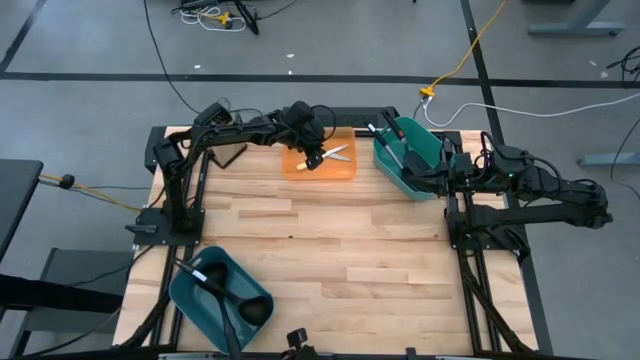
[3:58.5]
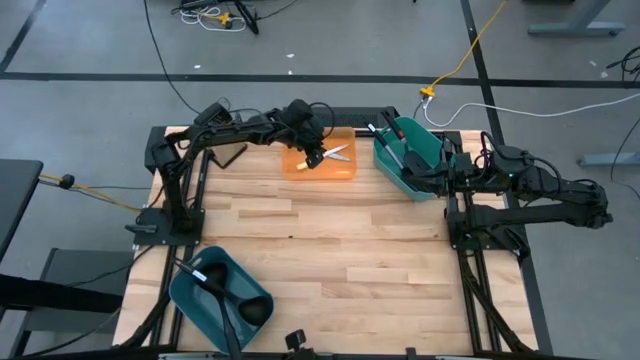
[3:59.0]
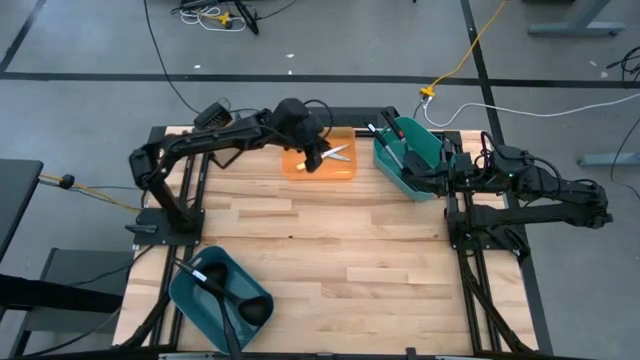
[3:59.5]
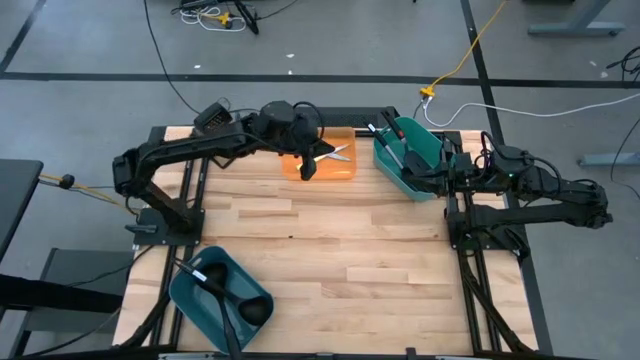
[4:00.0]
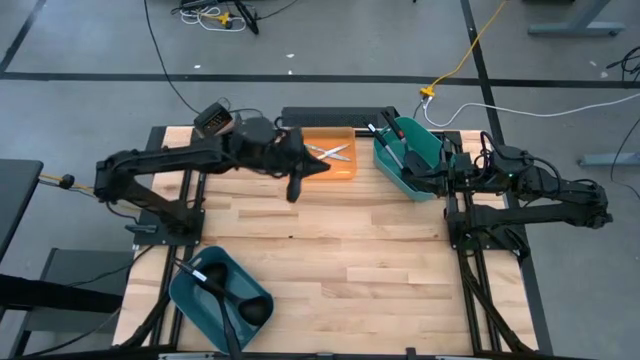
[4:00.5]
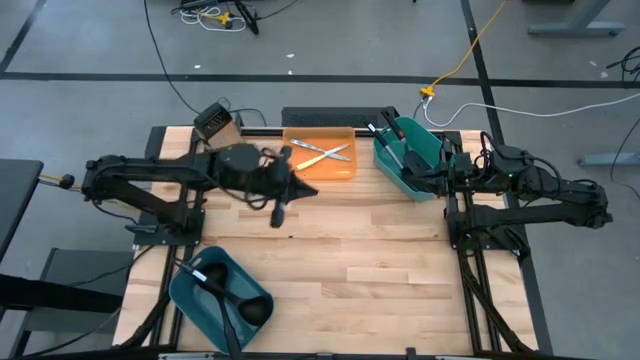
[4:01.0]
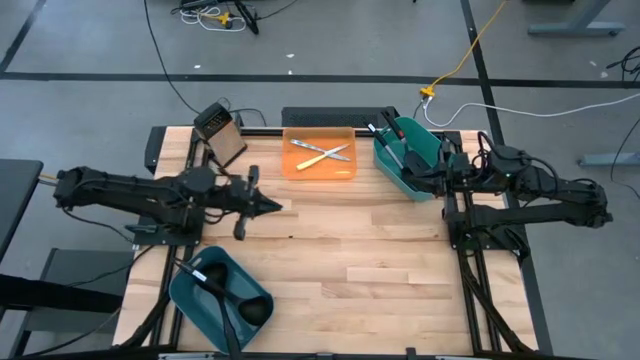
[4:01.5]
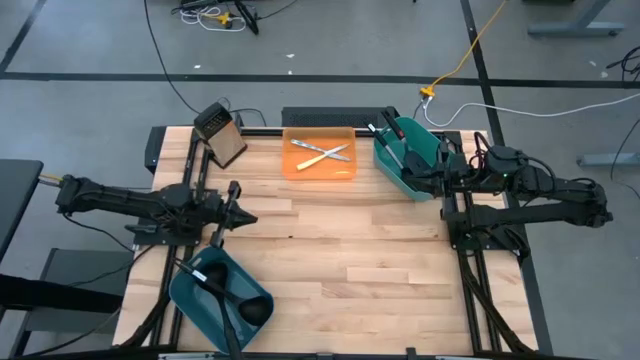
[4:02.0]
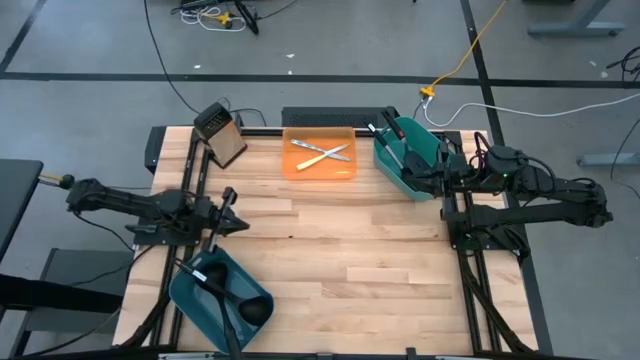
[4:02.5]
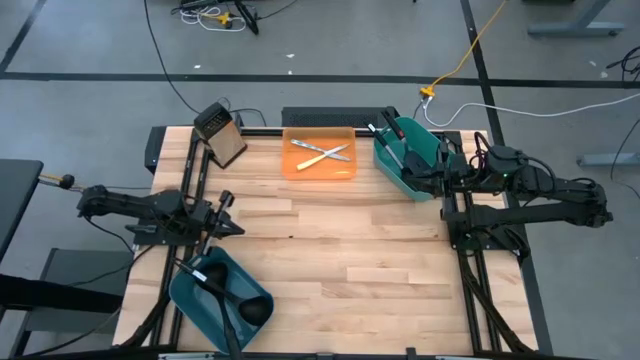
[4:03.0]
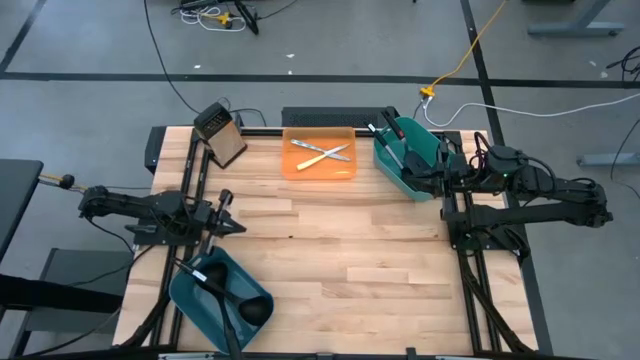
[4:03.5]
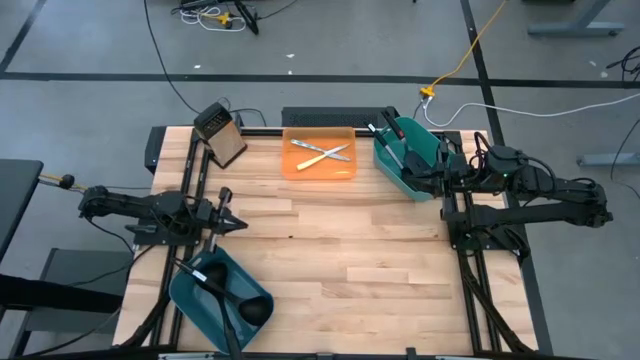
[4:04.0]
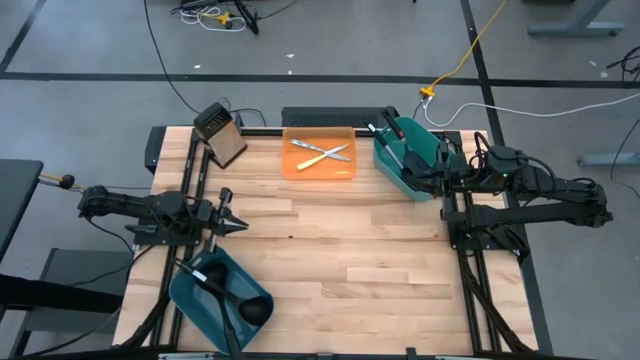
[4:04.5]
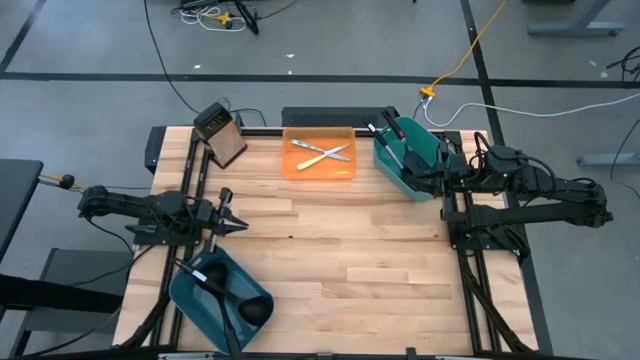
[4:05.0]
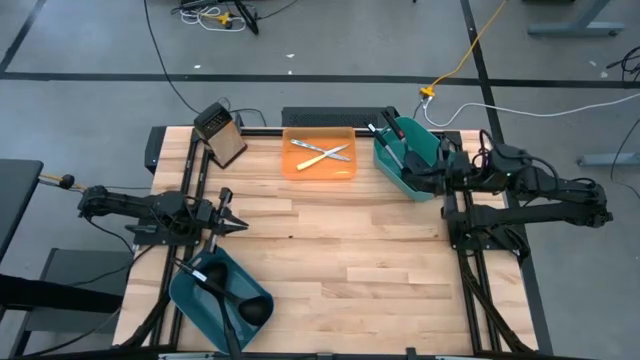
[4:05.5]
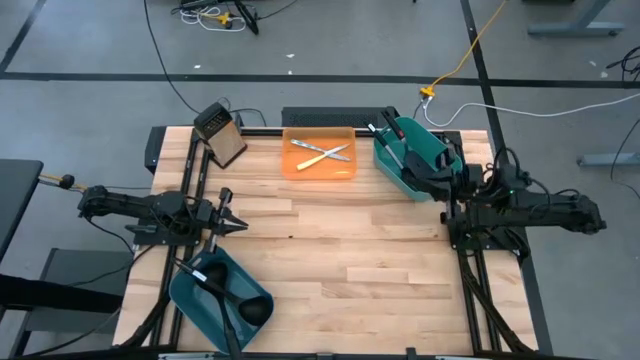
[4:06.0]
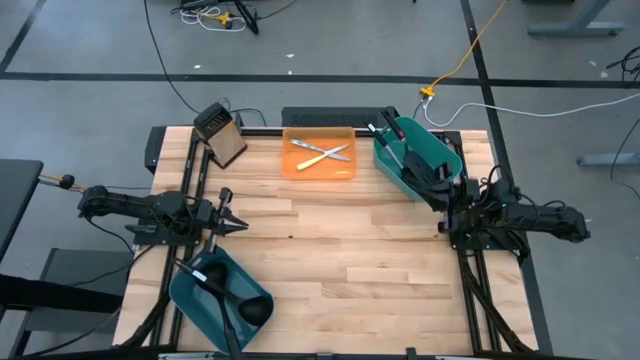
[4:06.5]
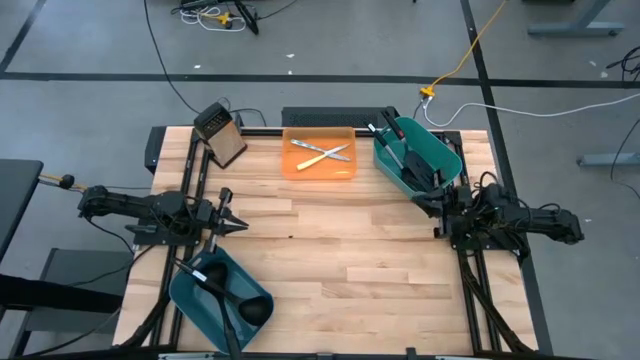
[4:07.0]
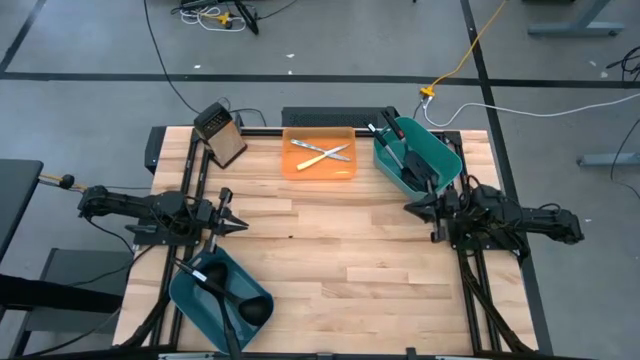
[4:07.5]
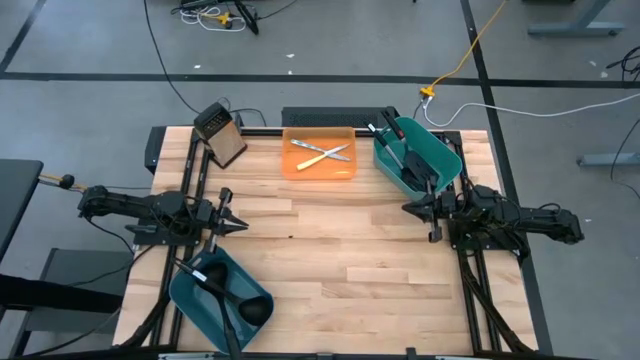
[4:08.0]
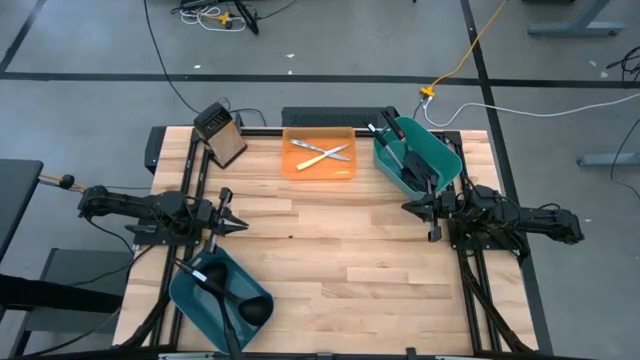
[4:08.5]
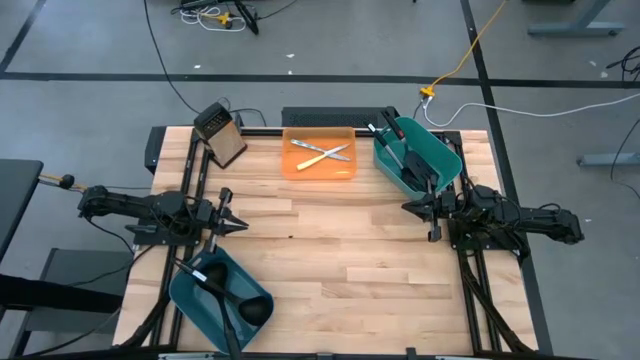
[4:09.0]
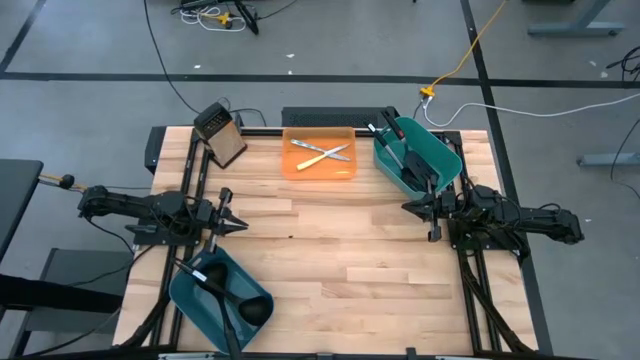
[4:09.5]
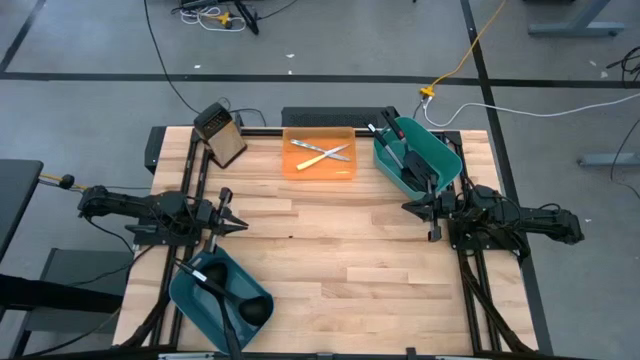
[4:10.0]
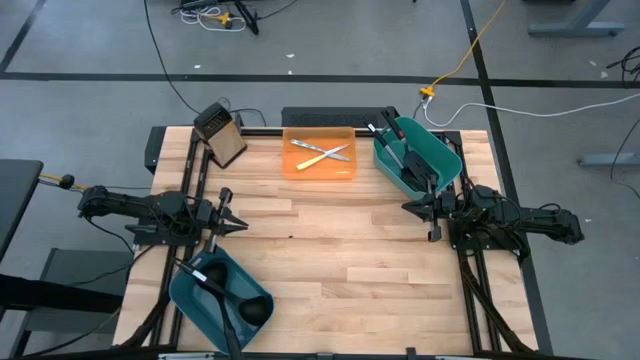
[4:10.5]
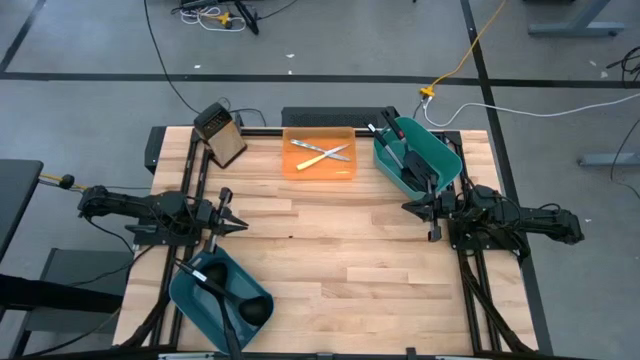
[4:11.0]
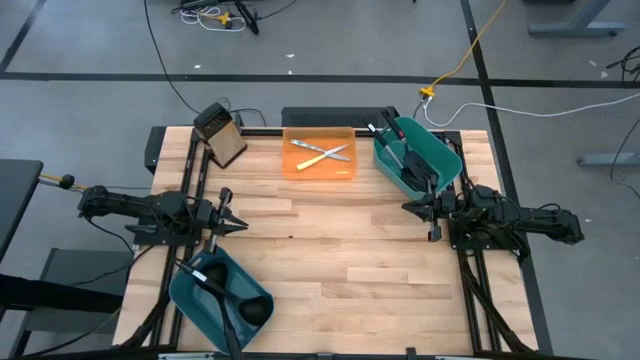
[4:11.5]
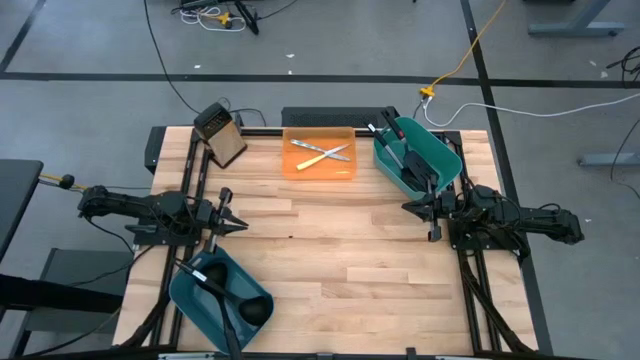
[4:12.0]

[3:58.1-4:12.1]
Task: Pick & Place Kitchen Items
Return to Home Position

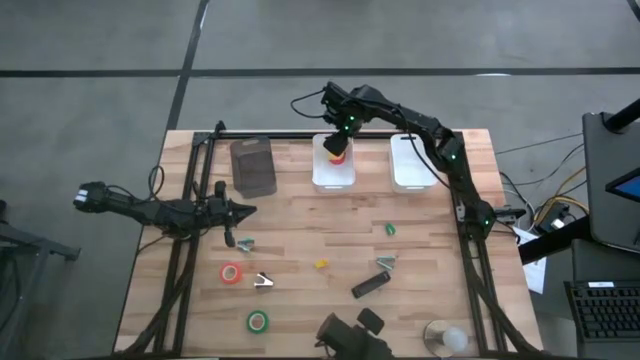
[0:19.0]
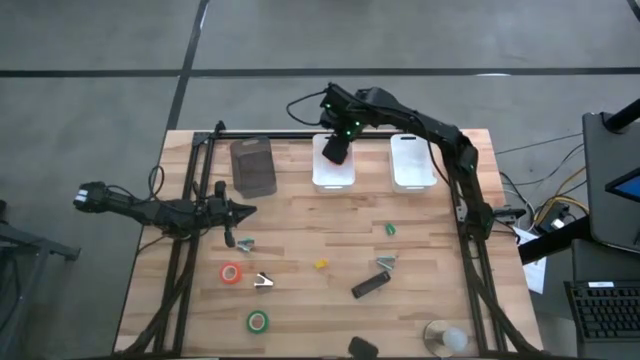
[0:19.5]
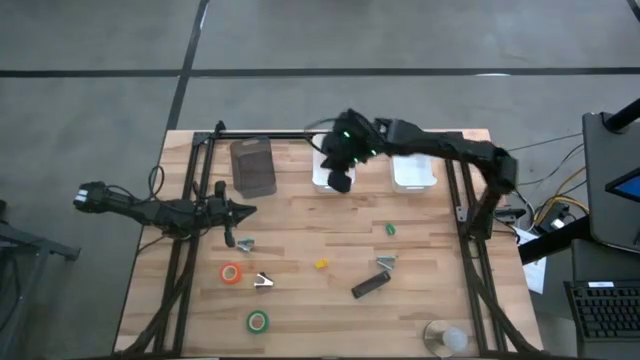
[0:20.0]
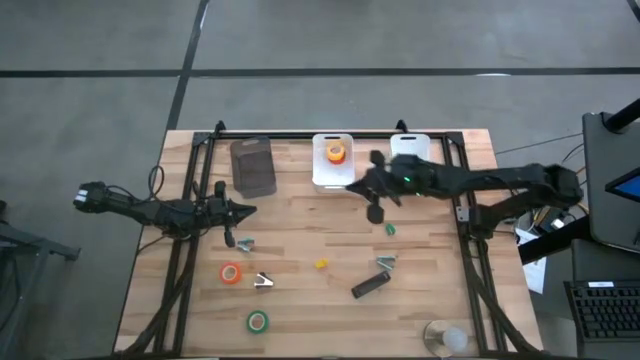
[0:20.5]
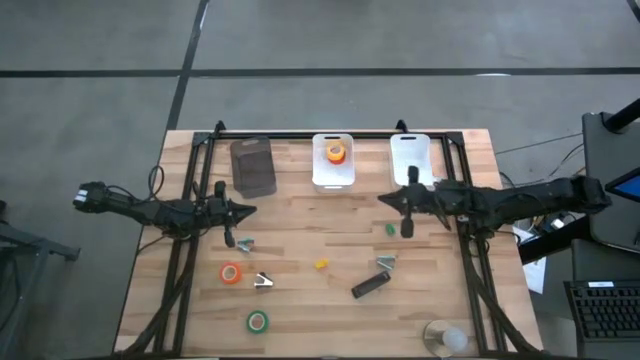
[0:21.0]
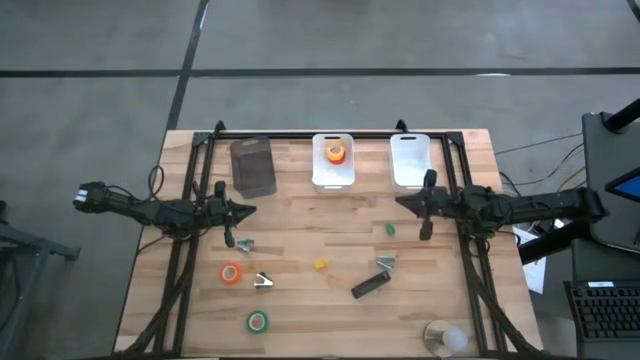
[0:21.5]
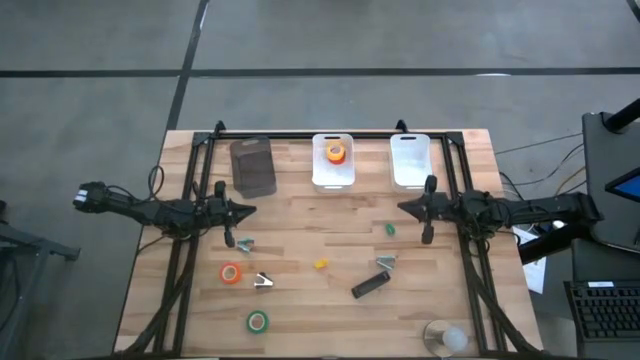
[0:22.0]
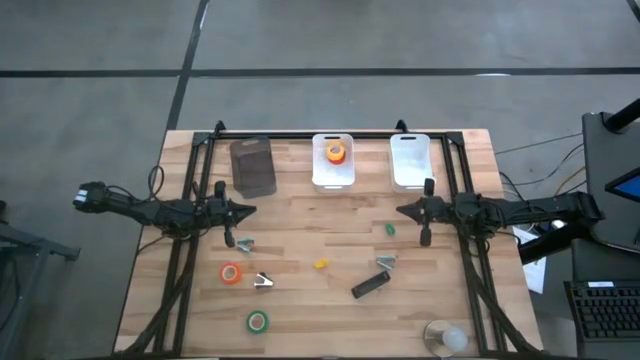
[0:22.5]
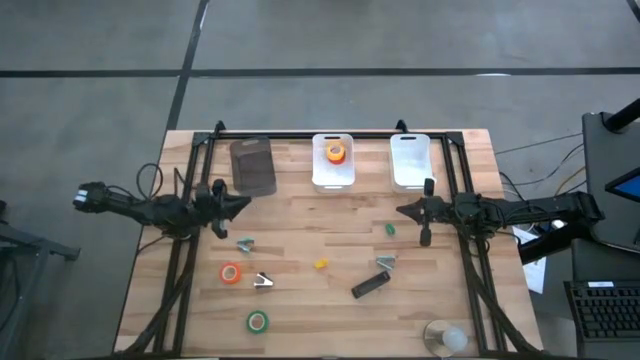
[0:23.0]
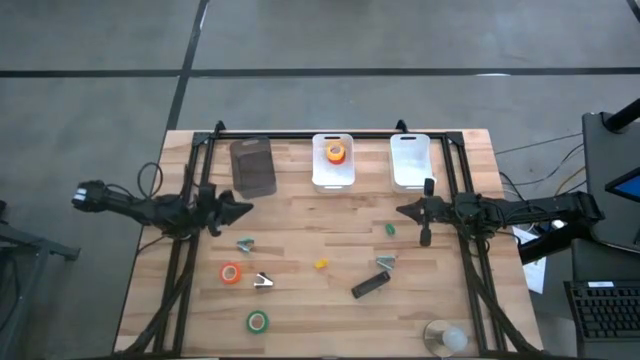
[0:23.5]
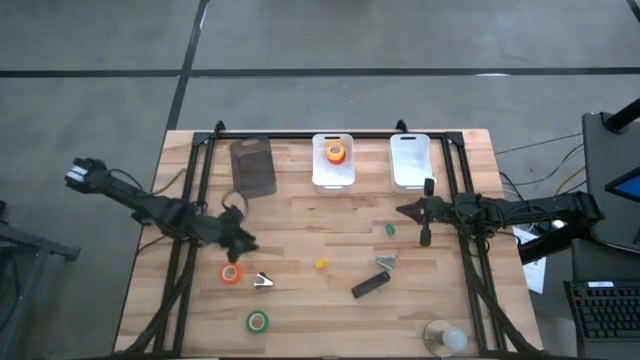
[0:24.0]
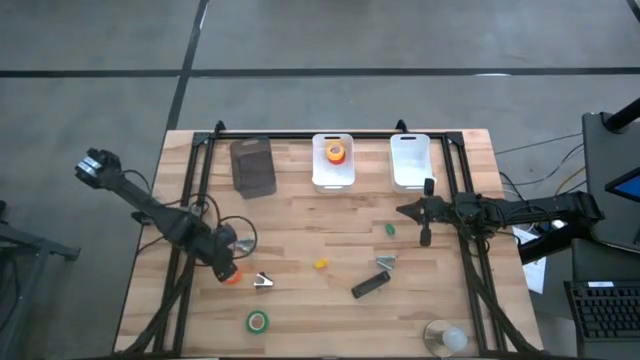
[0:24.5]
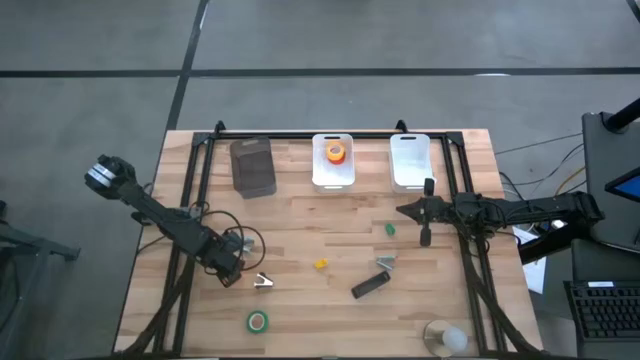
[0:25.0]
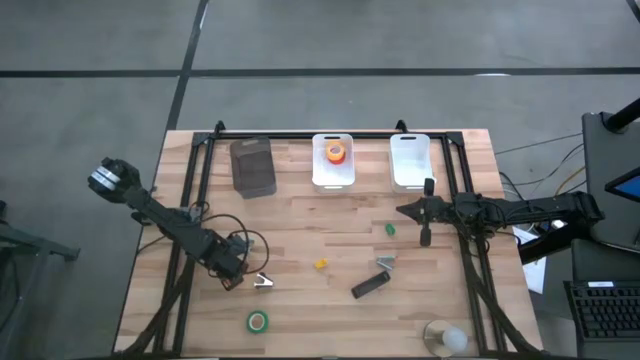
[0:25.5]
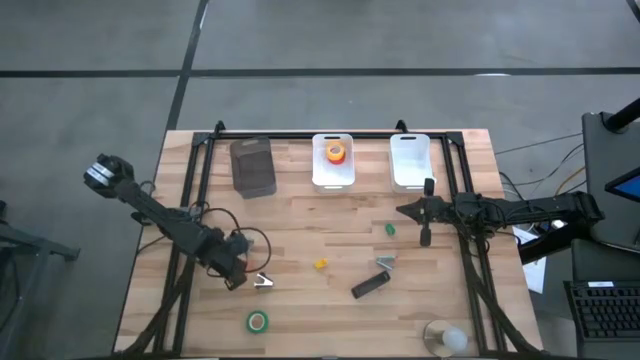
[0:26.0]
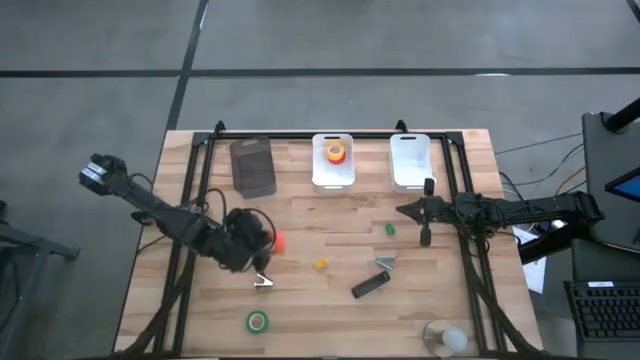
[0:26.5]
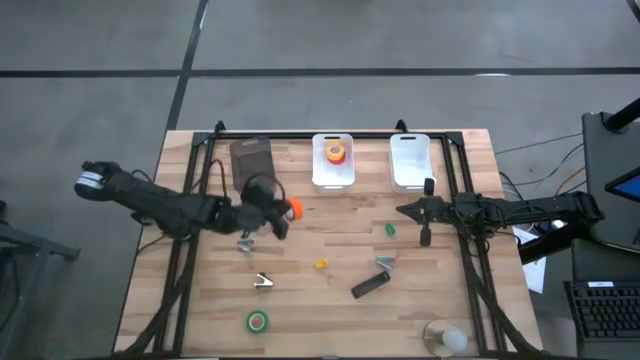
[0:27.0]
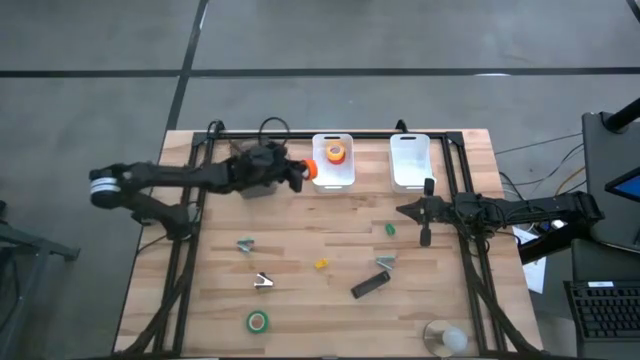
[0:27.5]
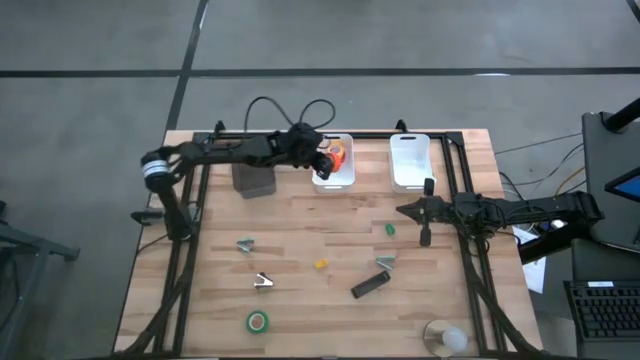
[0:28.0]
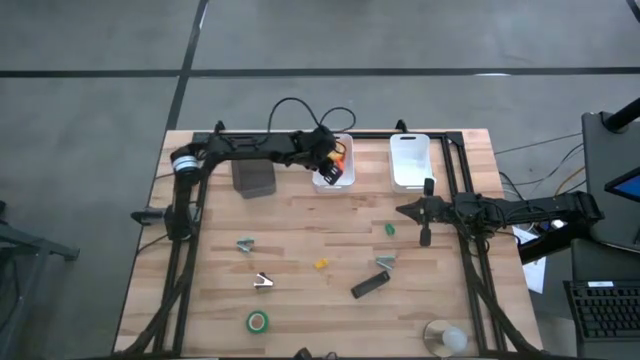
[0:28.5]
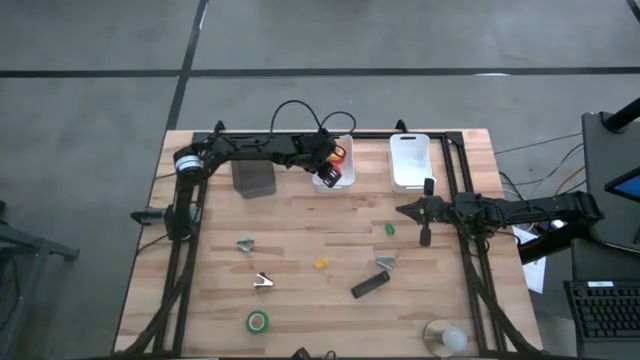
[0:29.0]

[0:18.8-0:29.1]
Task: Pick and place Stapler, Stapler remover, tape
Put the orange tape into the left white bin
